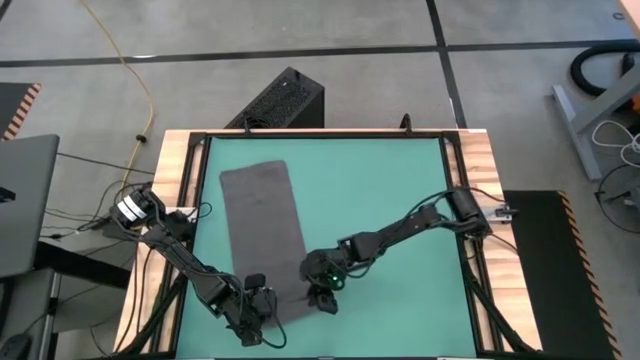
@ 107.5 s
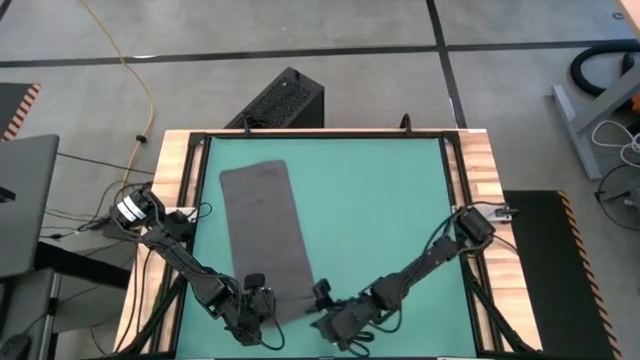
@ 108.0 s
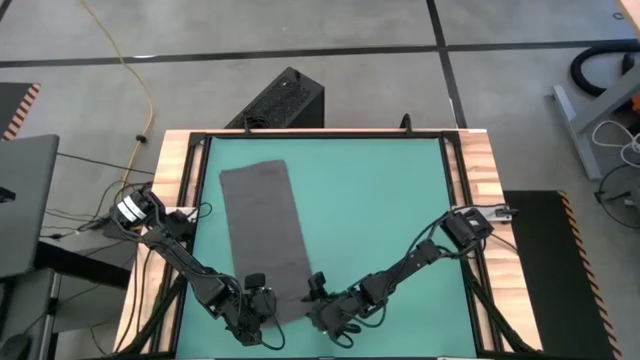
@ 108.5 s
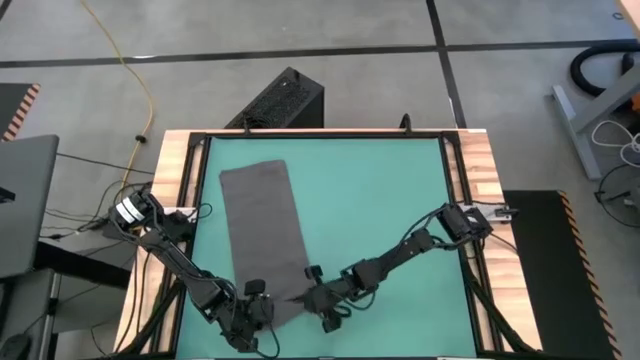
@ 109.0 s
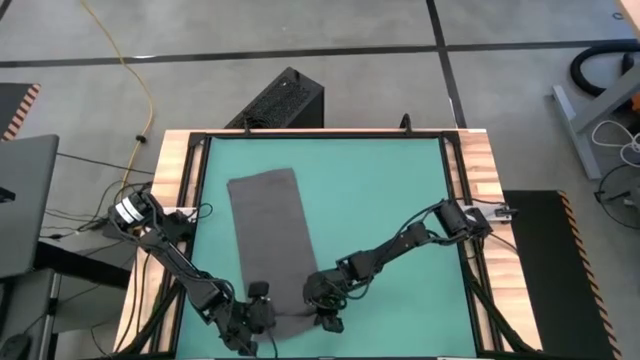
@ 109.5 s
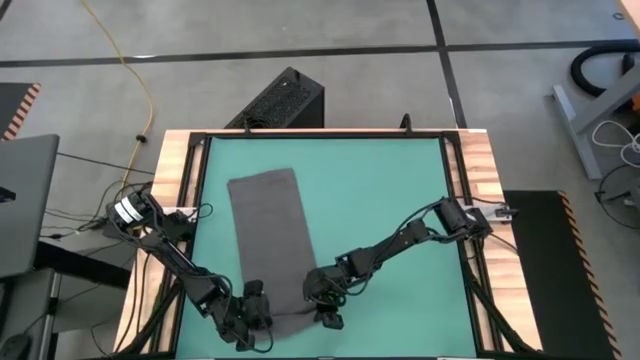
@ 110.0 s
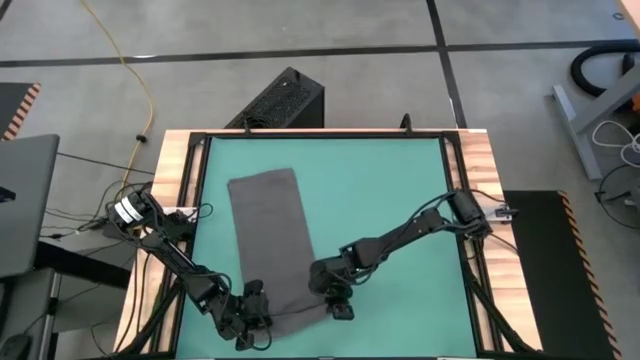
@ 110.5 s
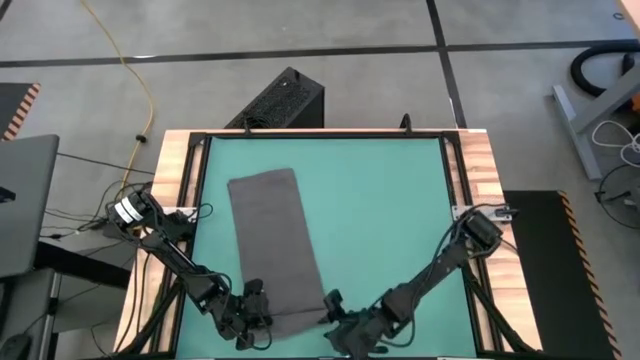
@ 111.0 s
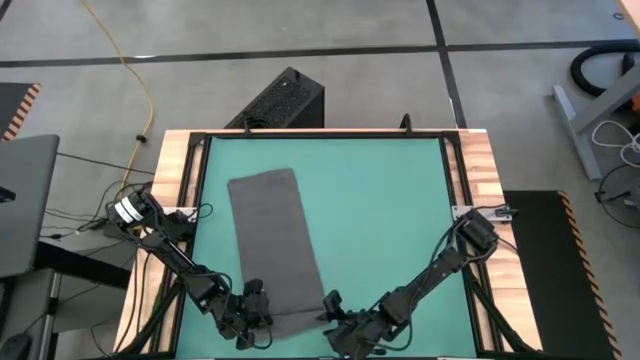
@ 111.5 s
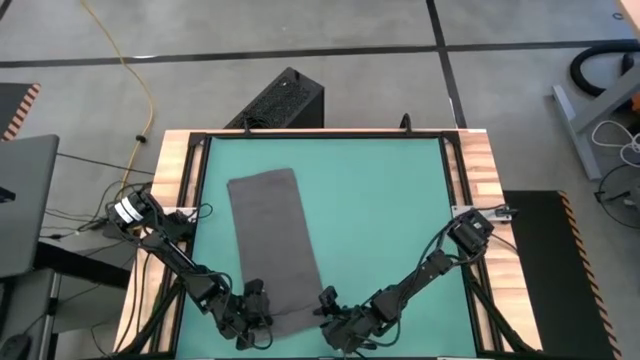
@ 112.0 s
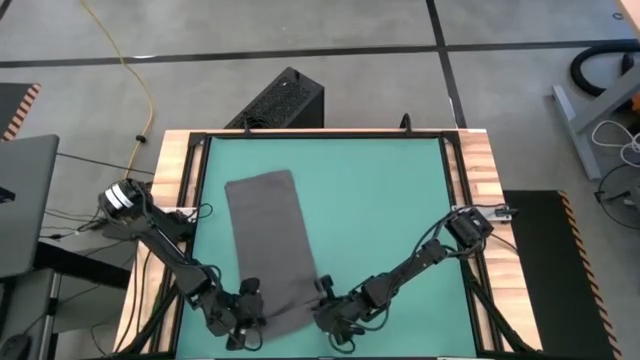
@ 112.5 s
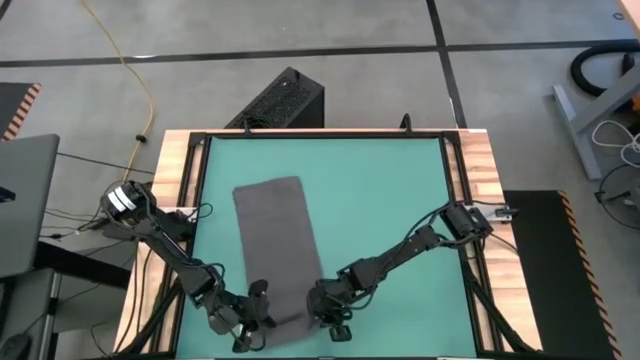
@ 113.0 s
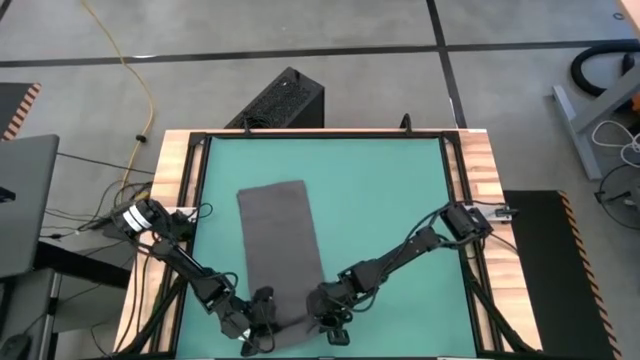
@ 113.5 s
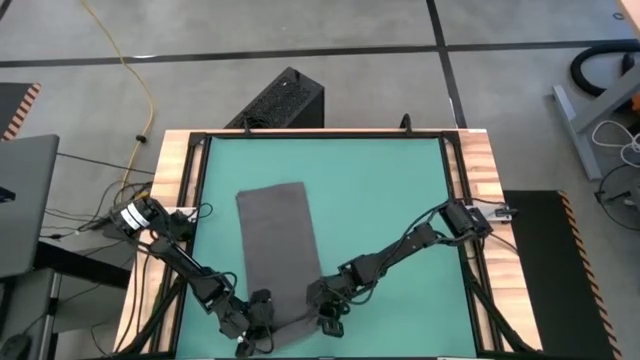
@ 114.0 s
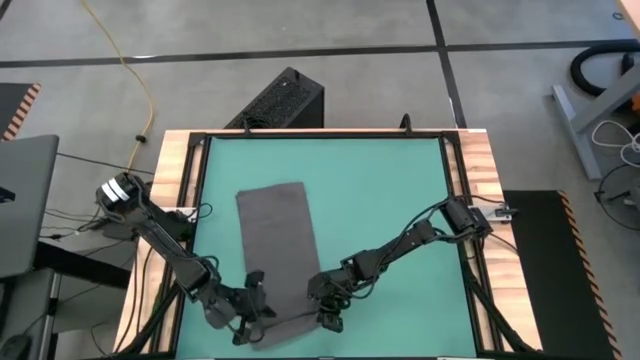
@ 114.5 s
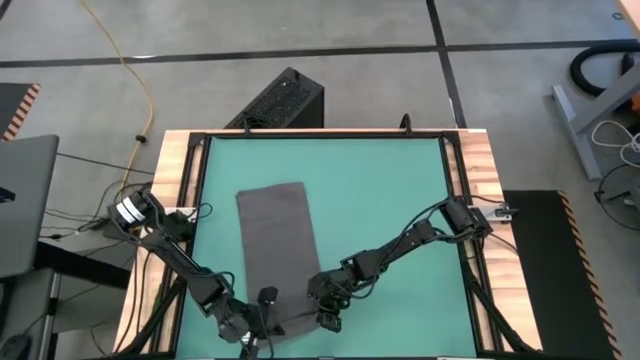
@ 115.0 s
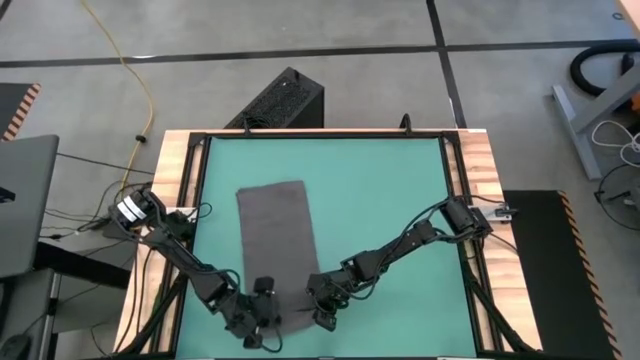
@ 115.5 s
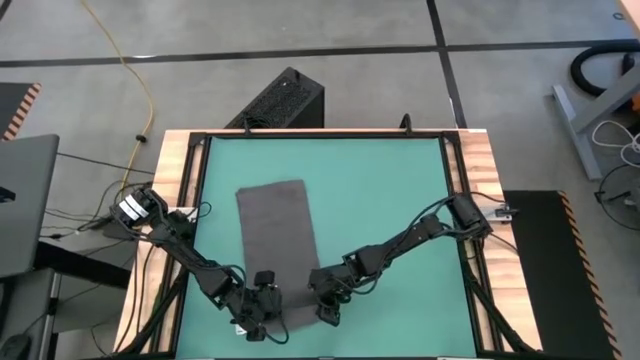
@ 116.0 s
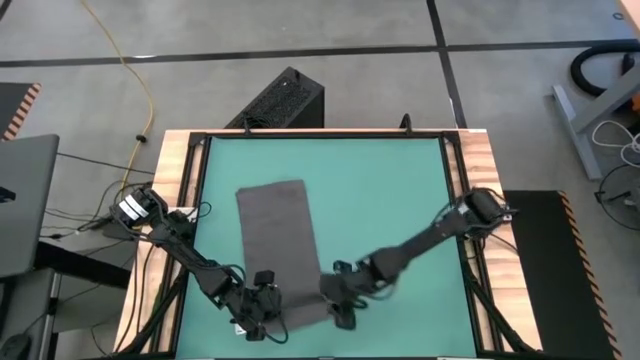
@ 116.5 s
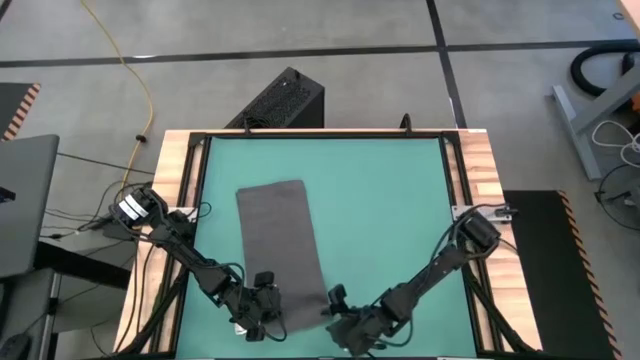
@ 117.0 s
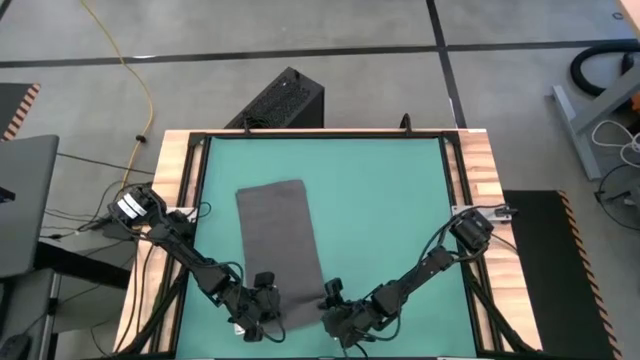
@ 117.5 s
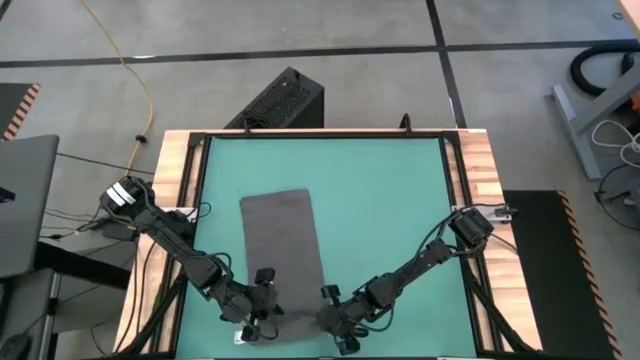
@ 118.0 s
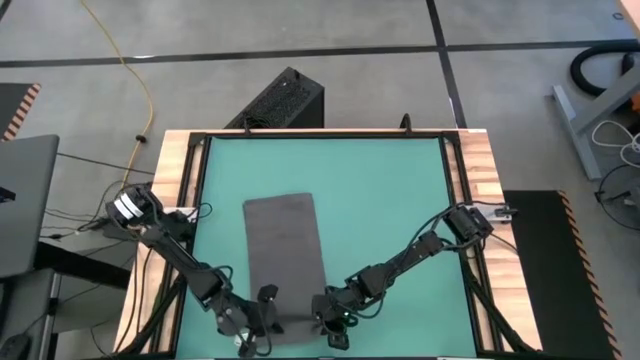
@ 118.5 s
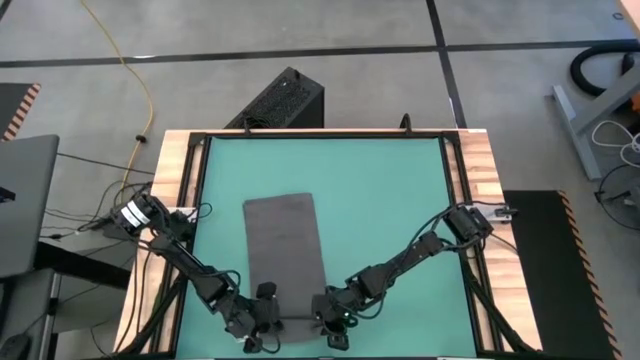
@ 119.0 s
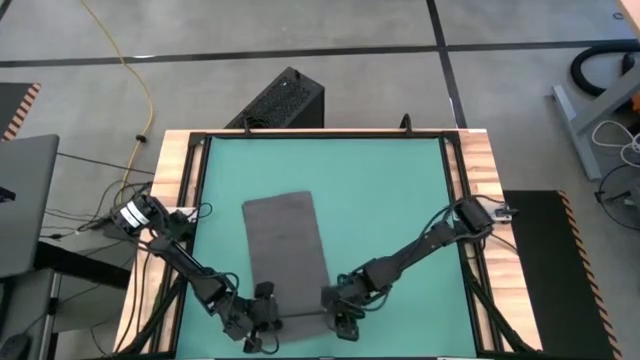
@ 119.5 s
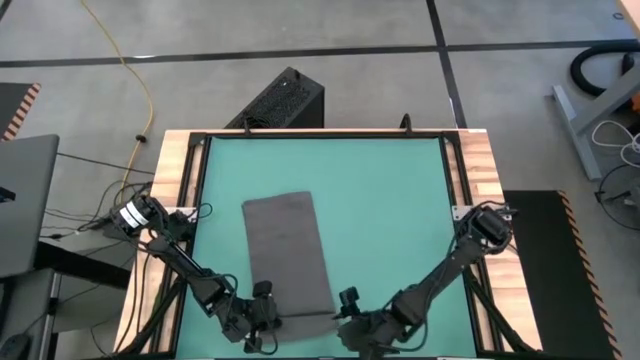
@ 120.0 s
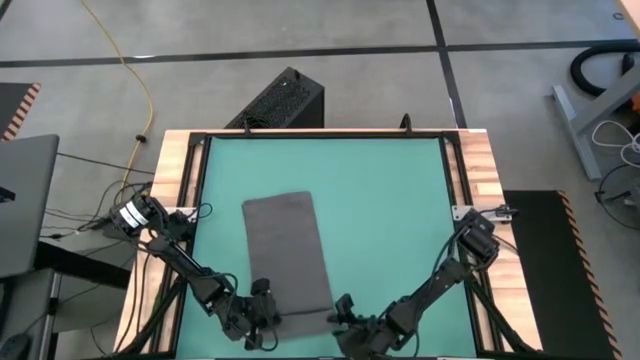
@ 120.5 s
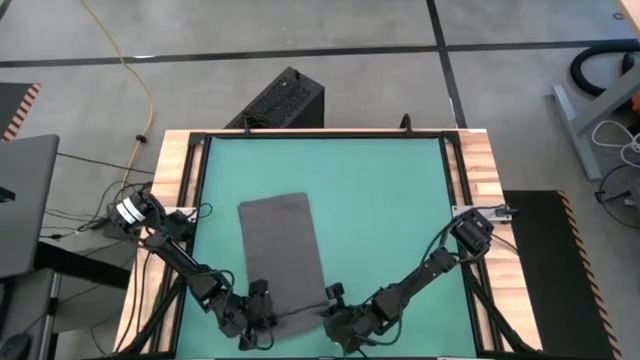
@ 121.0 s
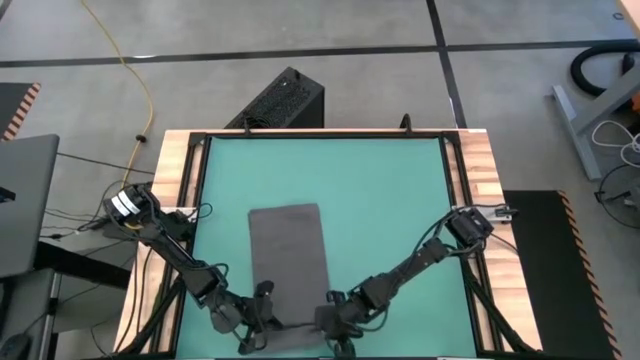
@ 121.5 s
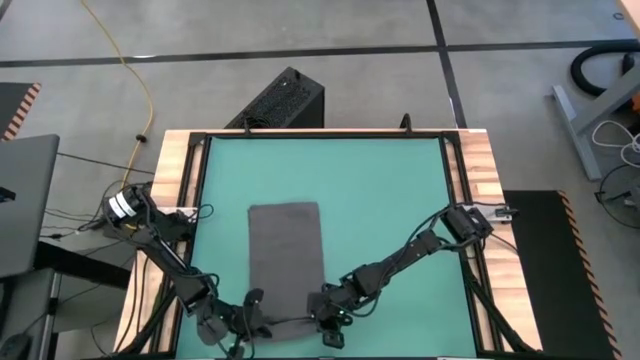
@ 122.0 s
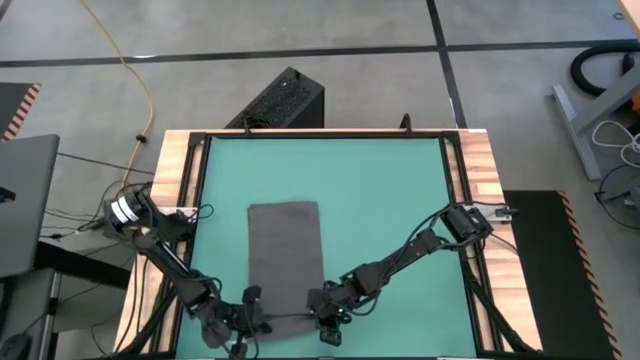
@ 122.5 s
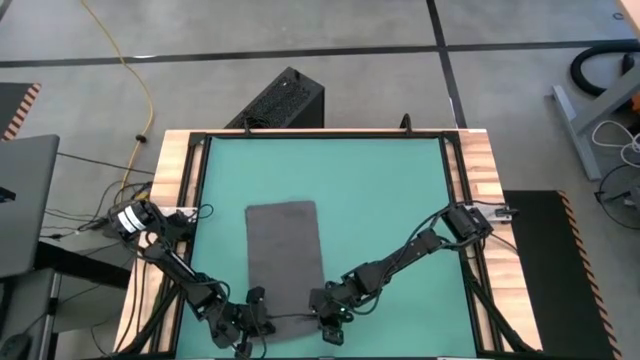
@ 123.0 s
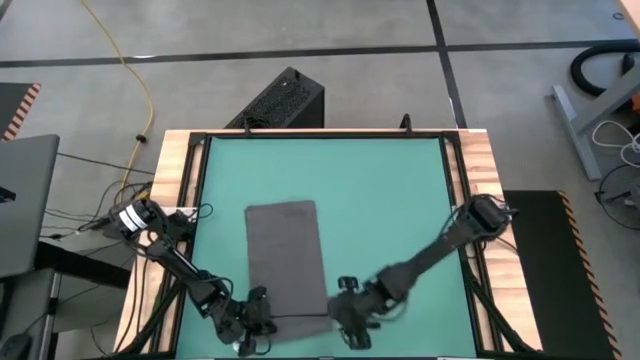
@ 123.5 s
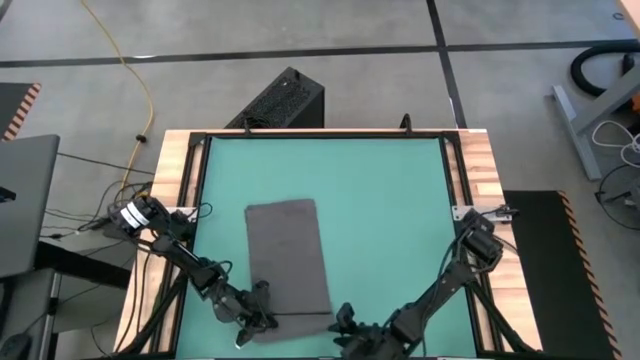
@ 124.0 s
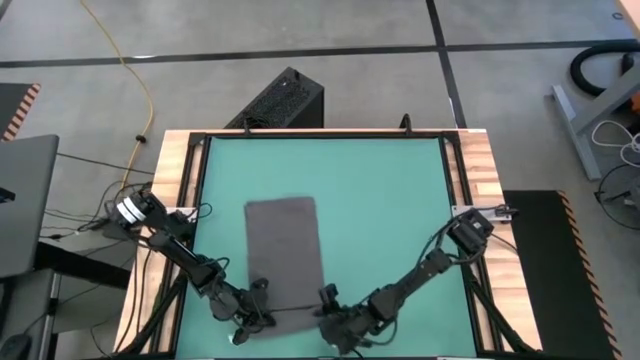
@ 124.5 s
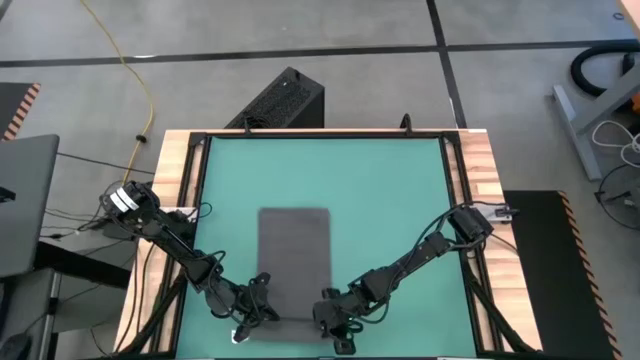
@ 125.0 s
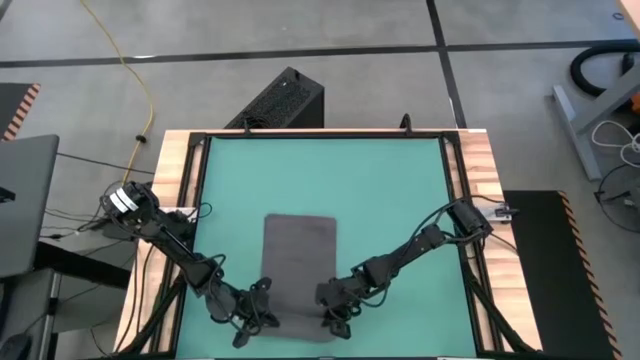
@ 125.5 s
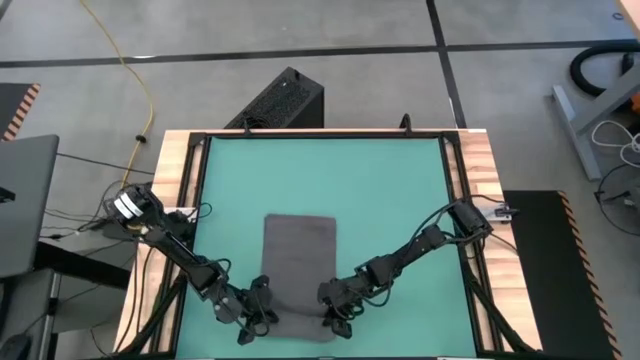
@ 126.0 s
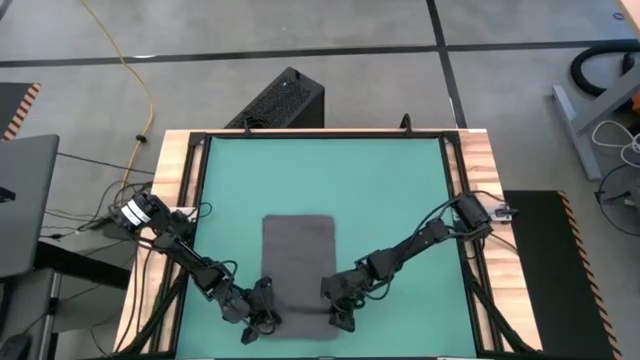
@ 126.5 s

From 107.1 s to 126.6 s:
Task: Roll towel
Roll the gray towel

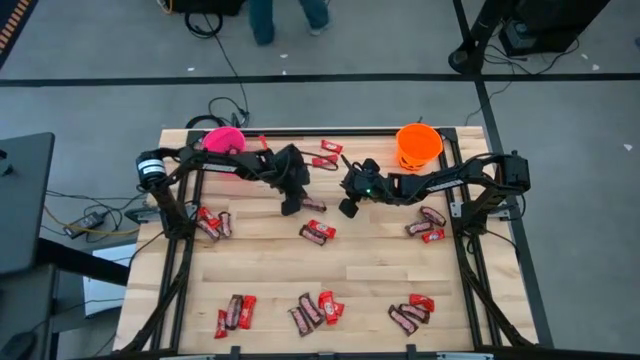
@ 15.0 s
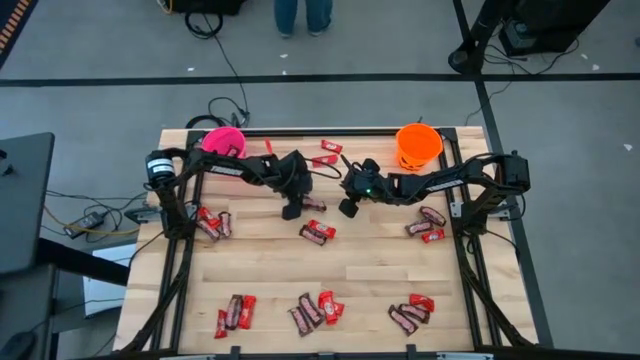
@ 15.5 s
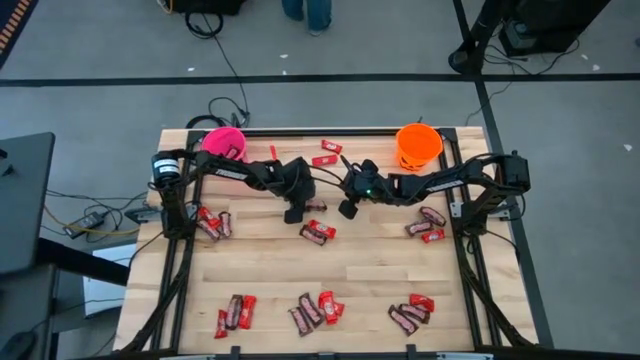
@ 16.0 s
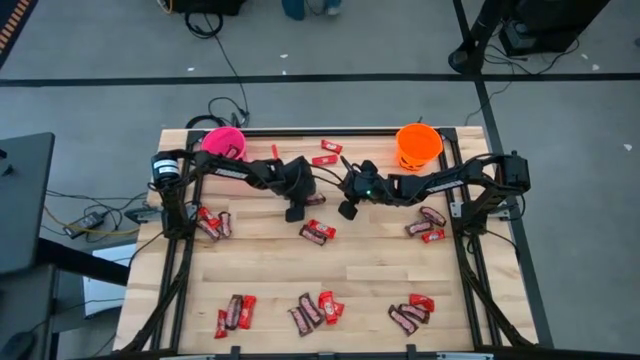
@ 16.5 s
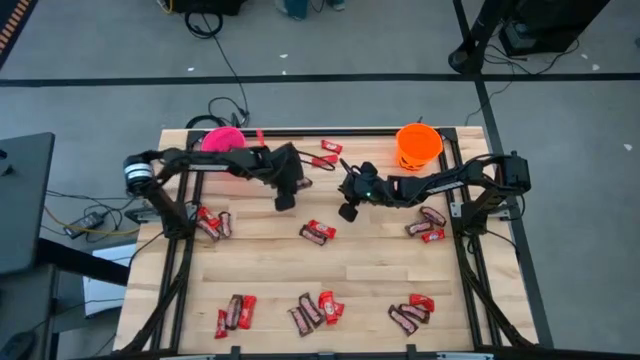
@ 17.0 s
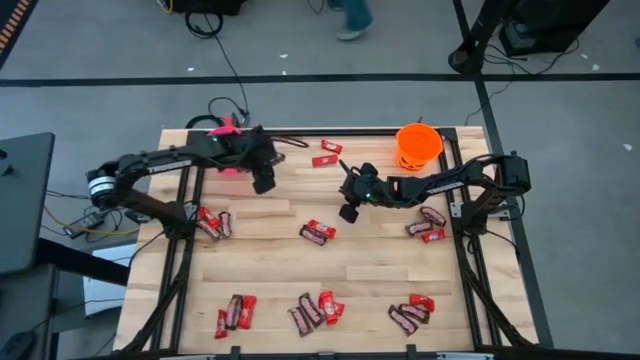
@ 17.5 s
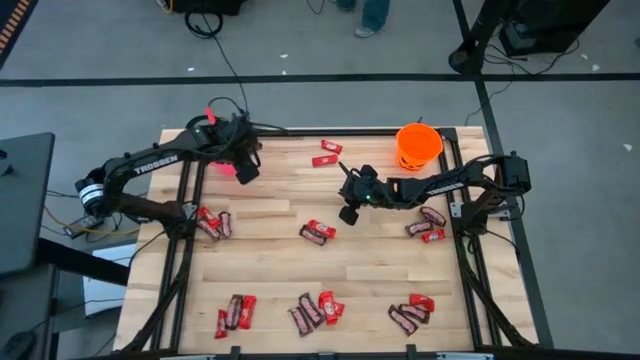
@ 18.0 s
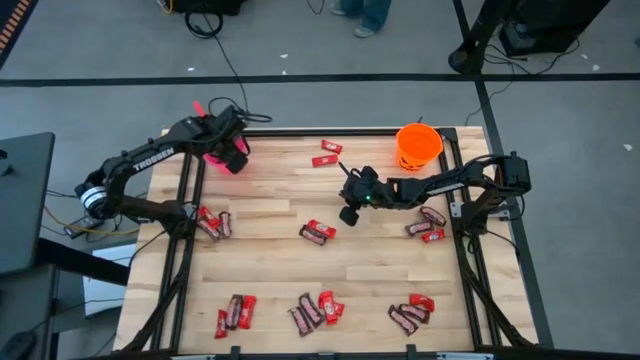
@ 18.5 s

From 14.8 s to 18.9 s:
Task: Sort candy by brand, put in halloween buckets
Put the brown chocolate bar into the pink bucket
